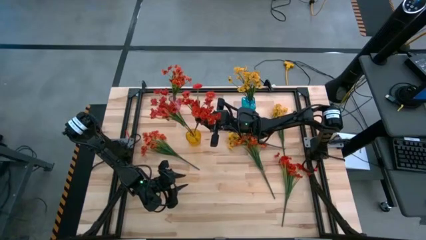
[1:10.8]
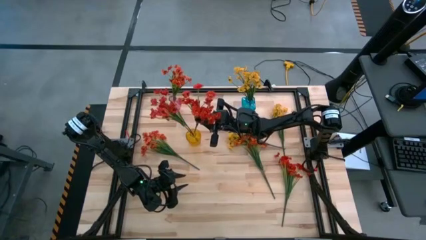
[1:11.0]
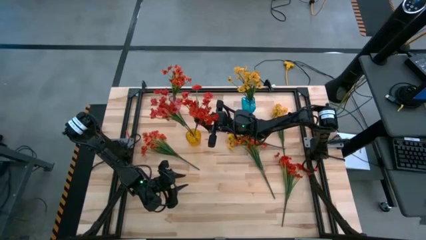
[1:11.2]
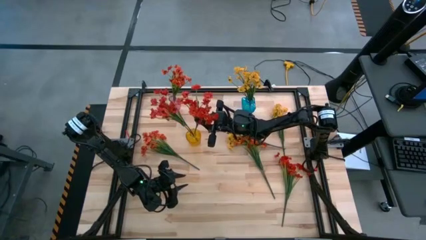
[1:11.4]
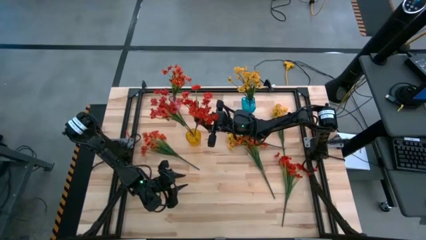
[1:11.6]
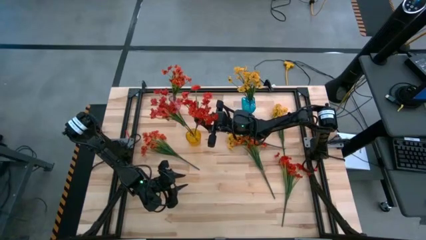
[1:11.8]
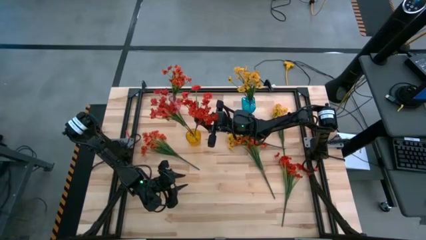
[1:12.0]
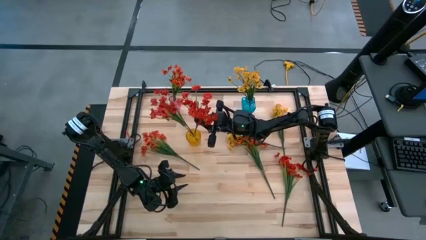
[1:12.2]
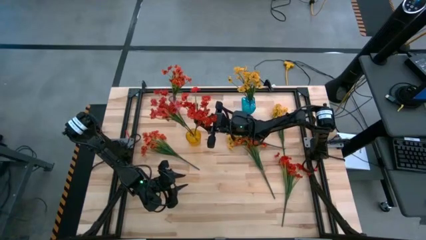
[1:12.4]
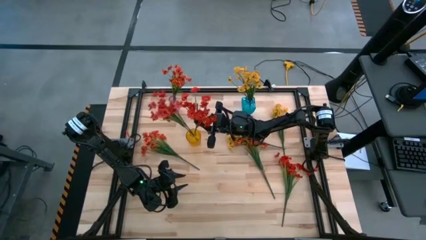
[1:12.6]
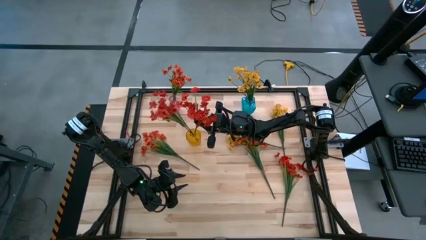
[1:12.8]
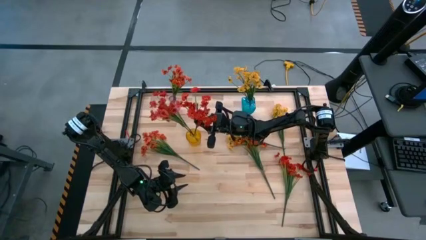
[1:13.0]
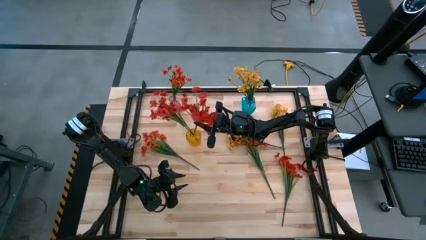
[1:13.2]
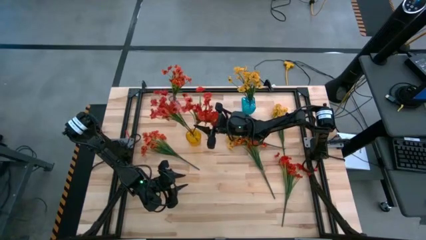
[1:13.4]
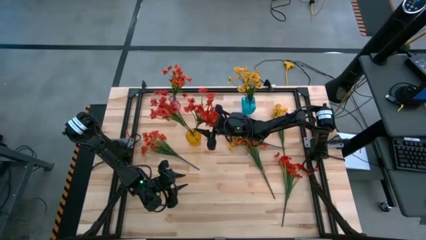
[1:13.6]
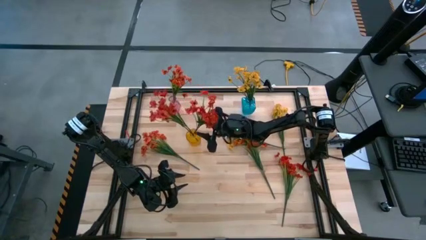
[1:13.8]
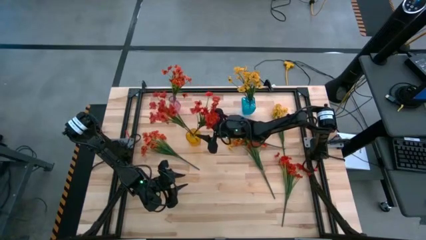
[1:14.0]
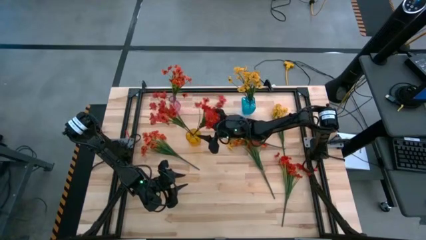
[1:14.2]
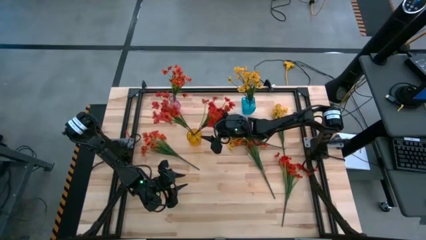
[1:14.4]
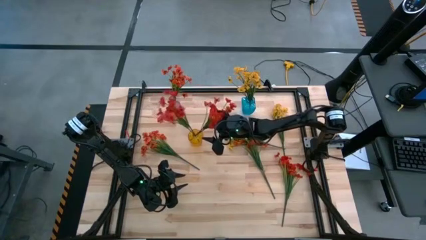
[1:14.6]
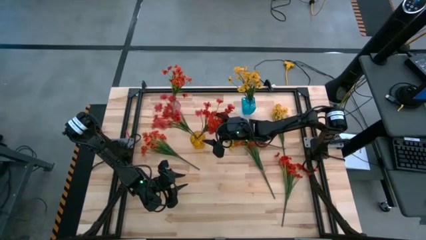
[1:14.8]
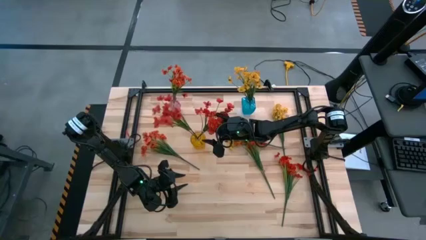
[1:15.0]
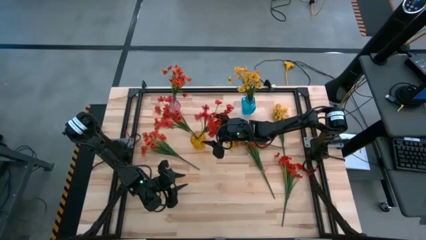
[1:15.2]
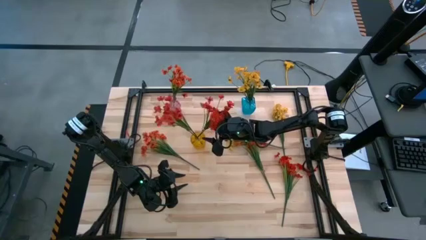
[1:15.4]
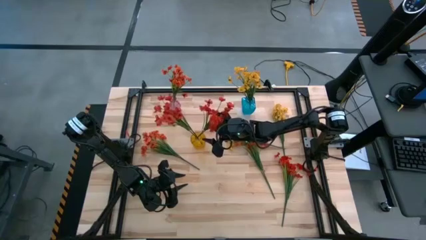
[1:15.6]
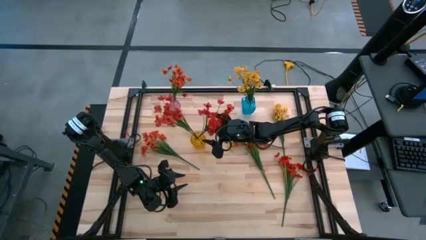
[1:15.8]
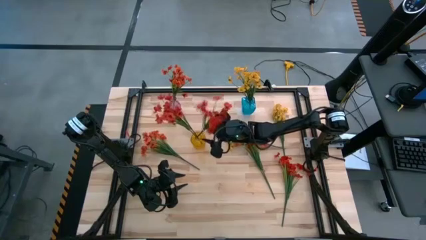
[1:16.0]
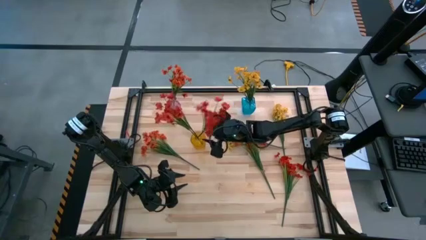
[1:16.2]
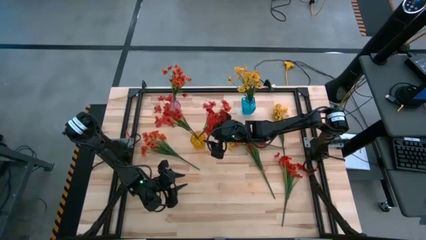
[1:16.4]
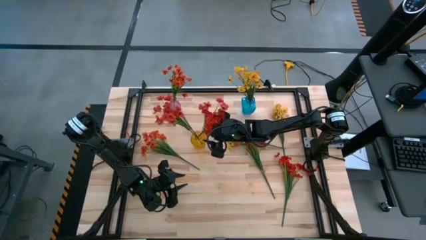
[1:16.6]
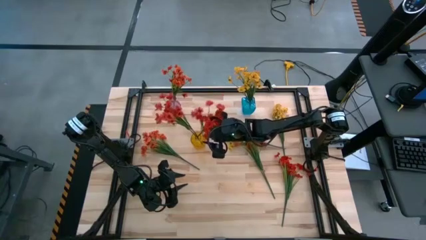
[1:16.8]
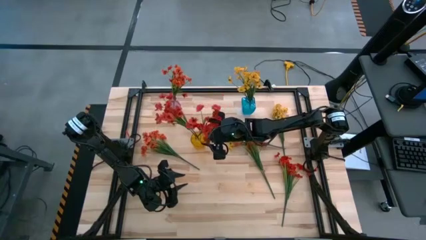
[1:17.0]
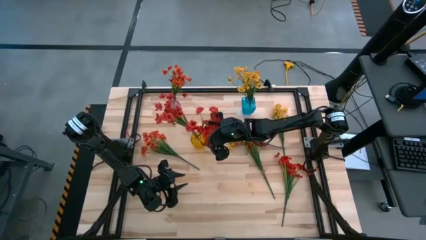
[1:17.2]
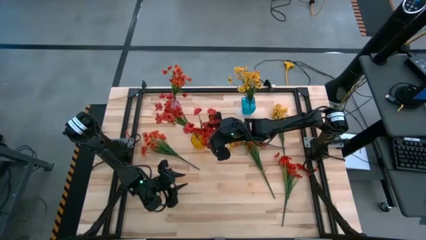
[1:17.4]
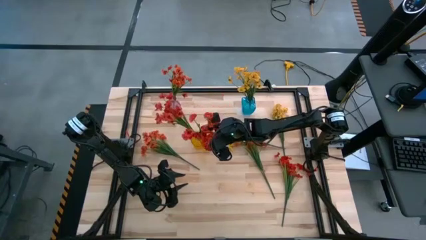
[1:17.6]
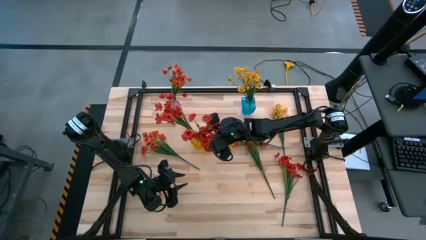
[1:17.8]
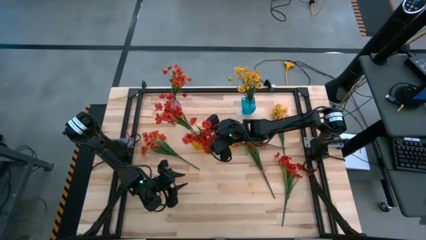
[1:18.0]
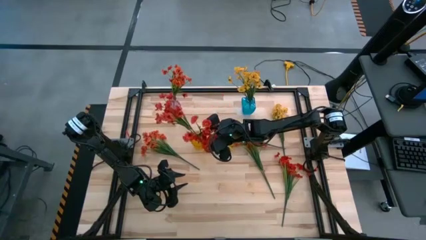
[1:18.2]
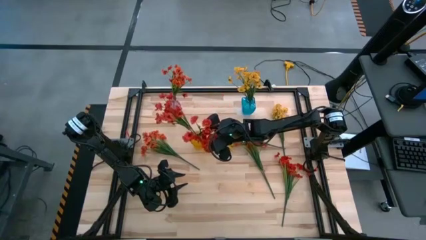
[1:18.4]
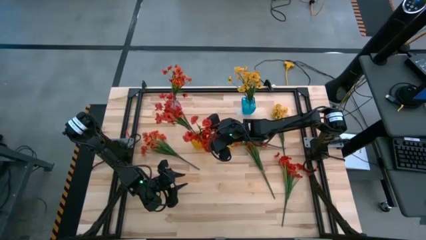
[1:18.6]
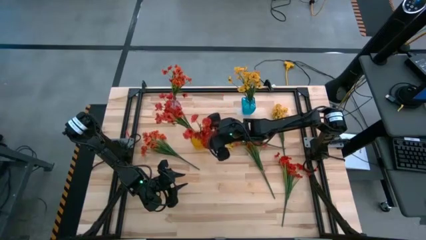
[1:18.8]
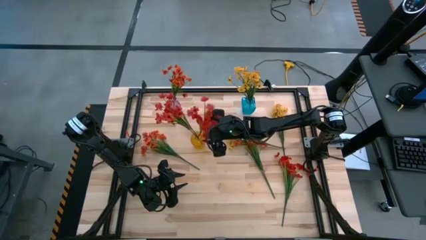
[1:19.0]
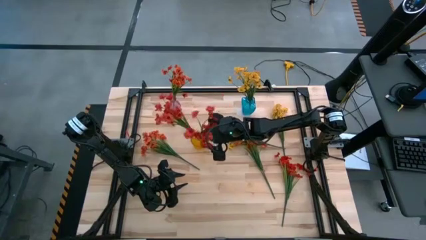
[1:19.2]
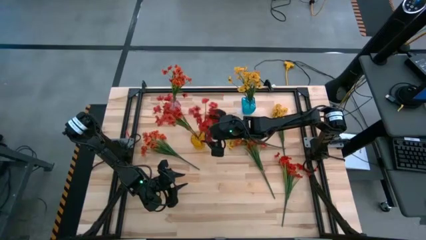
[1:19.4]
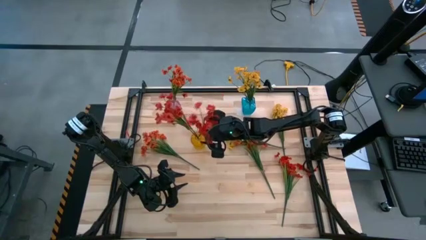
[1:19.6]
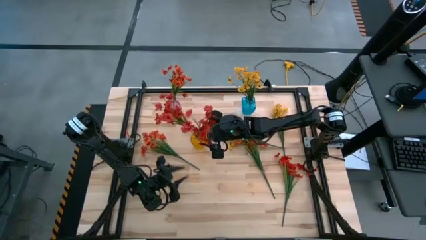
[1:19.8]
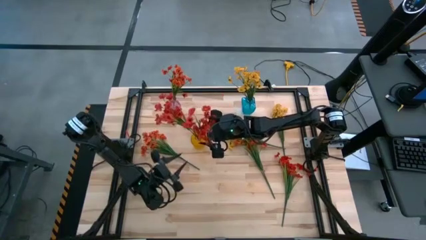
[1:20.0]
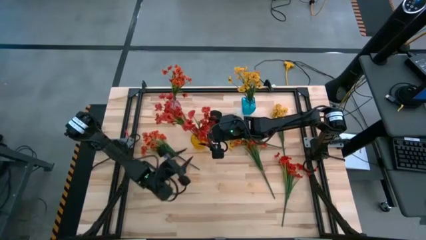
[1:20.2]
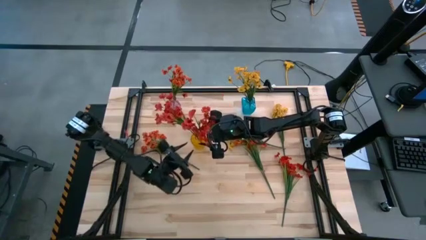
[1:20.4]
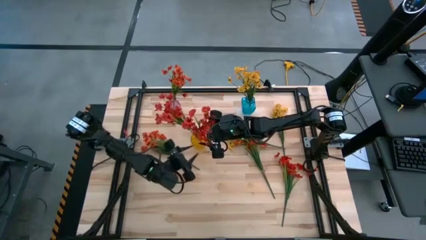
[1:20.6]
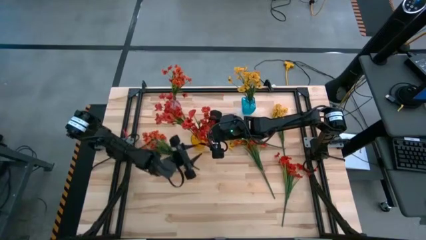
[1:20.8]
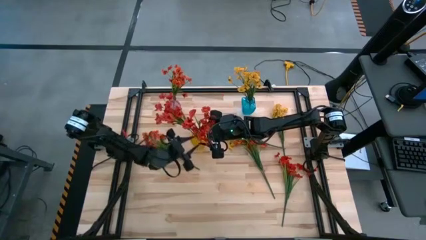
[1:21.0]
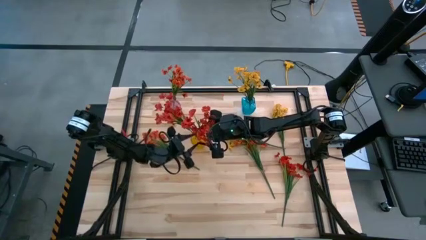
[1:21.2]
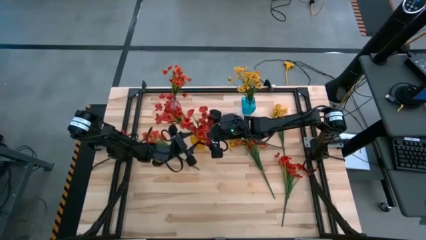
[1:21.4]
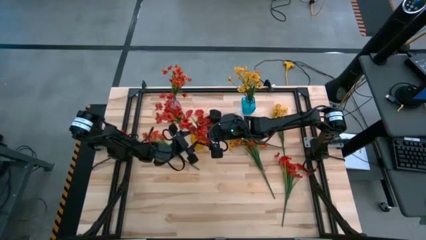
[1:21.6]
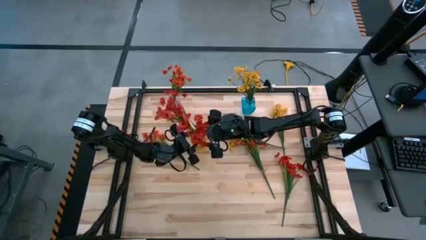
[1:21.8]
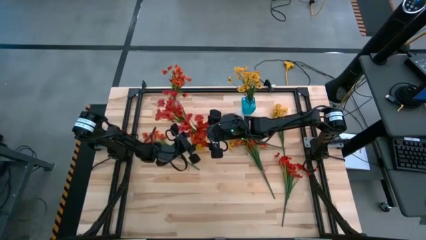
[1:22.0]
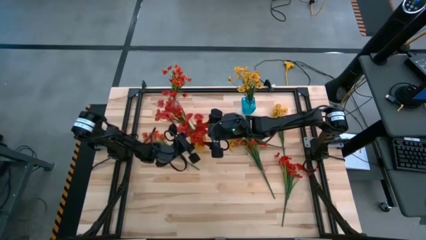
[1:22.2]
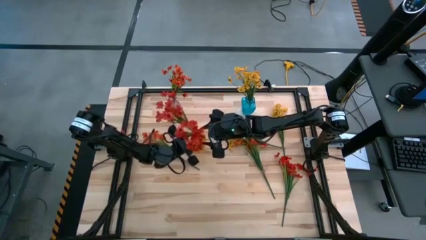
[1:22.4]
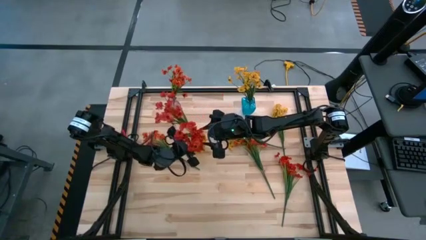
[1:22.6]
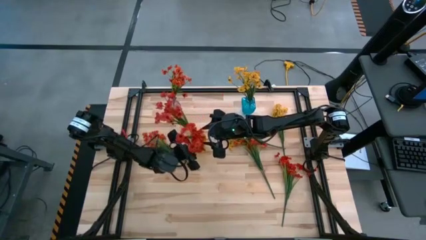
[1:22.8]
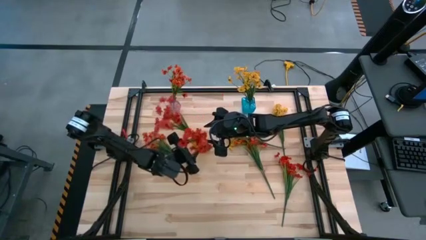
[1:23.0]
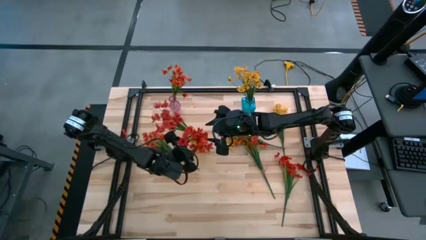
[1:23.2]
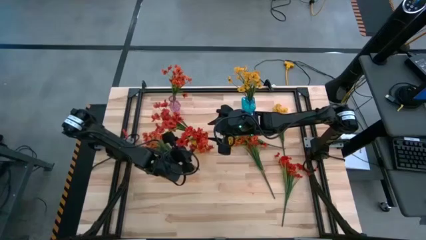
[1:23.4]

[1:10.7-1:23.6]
Task: Sort flowers into vase by color
Put left red flower into the yellow vase

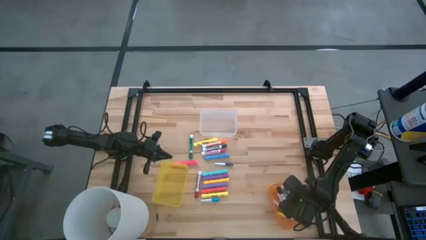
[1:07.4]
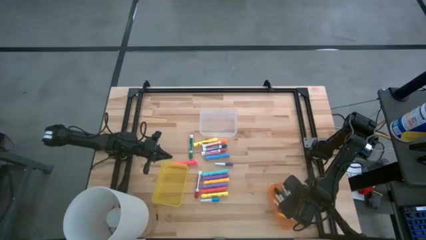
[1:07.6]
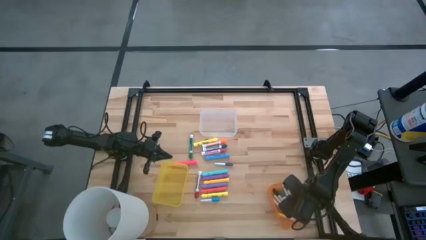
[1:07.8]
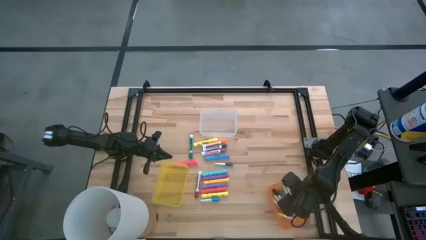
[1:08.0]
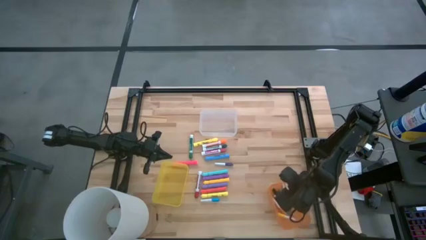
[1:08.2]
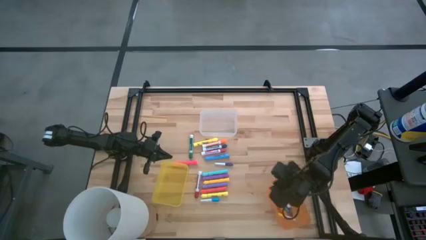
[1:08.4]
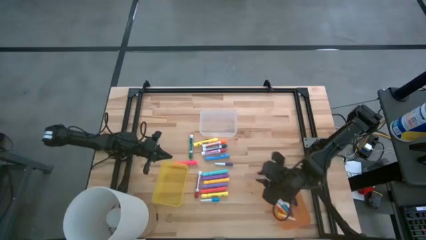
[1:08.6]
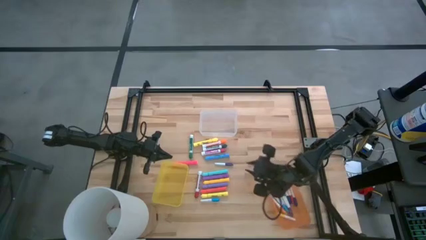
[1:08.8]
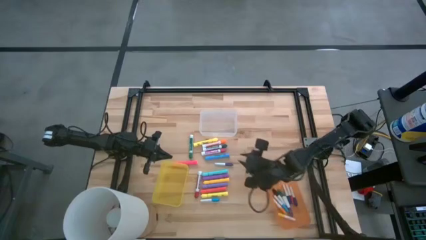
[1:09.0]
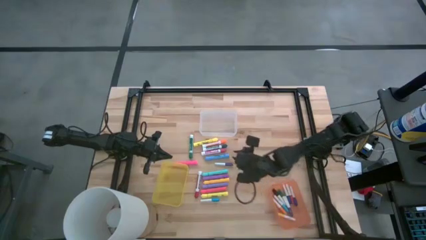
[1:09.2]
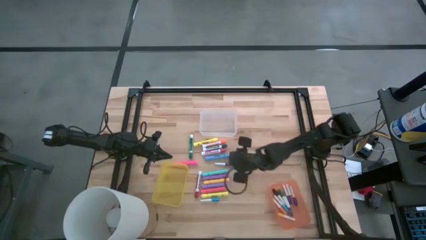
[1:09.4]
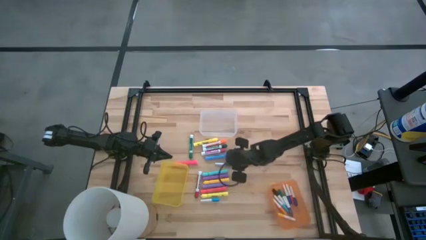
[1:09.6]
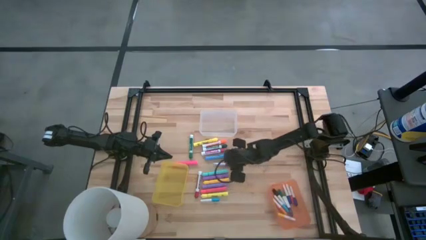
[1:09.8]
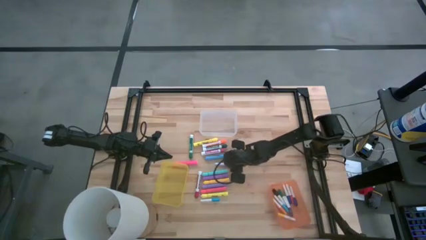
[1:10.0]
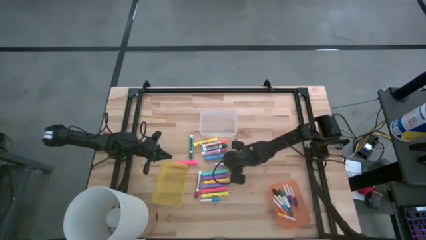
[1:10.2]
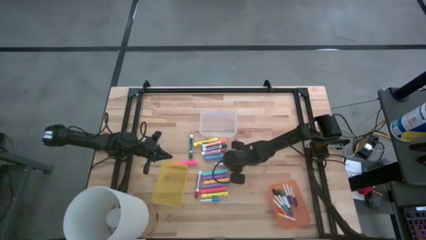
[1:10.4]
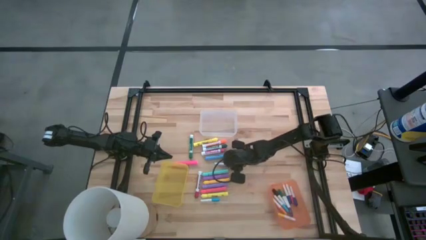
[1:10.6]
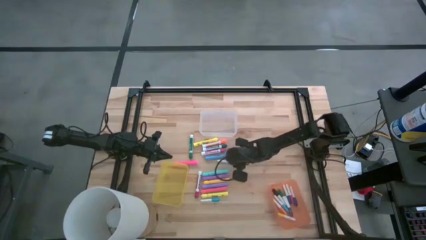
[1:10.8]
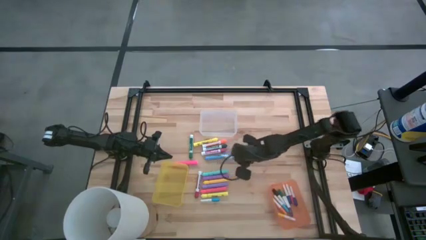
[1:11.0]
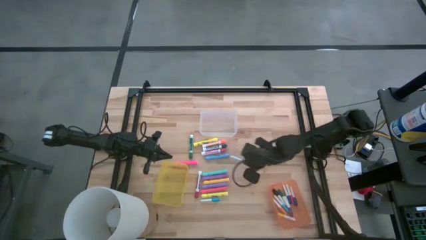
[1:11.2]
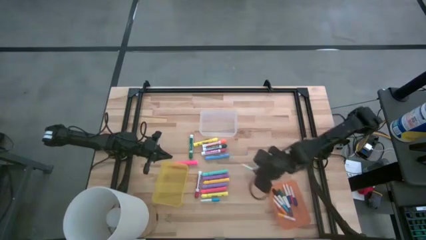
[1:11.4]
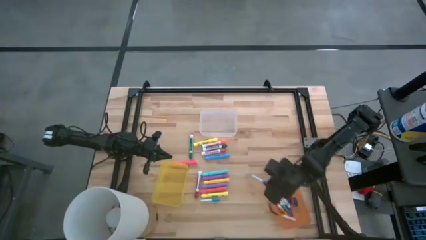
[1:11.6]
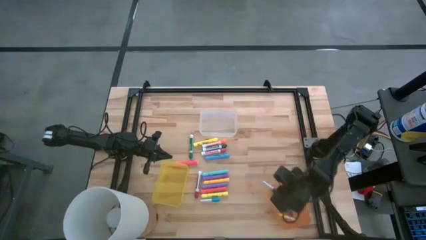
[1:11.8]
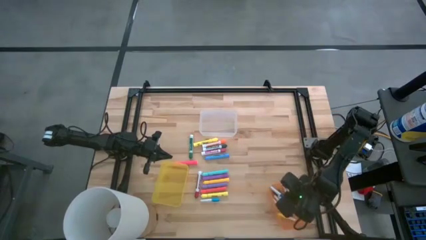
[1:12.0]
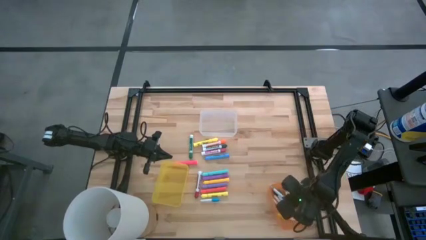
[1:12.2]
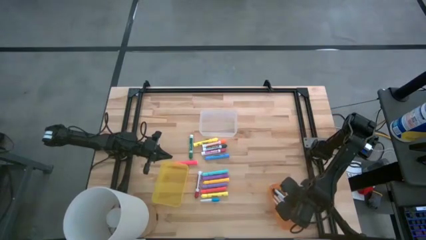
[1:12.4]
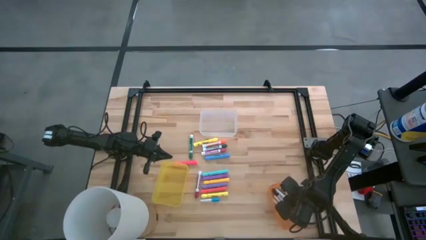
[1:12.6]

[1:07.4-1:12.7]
Task: Pick & Place Markers
Put the small purple highlighter pen into the orange bin
